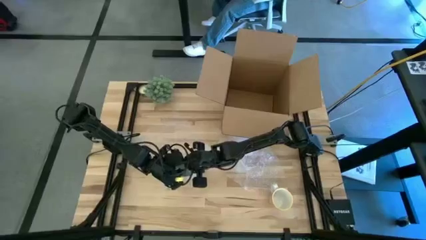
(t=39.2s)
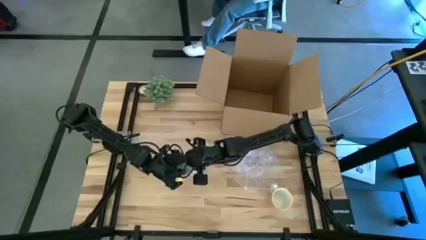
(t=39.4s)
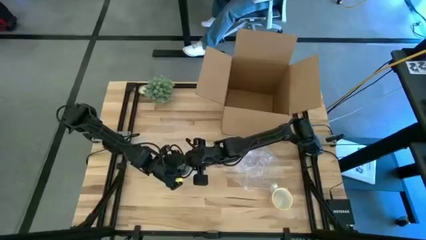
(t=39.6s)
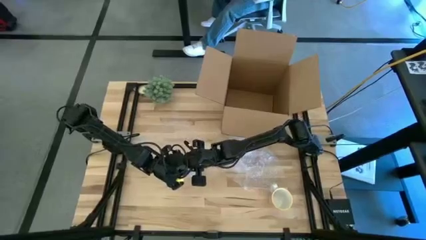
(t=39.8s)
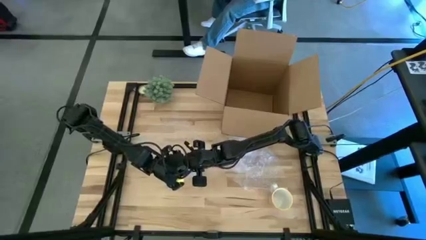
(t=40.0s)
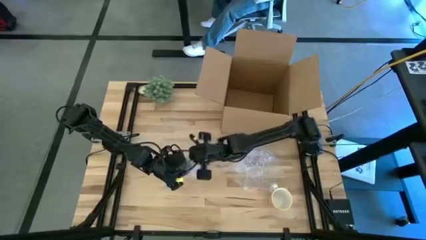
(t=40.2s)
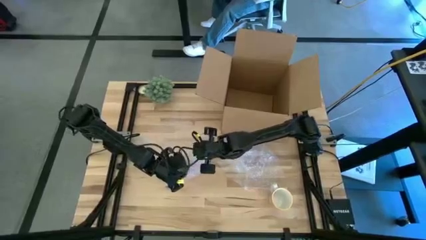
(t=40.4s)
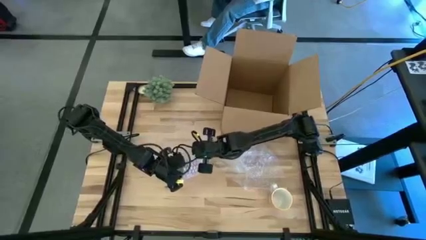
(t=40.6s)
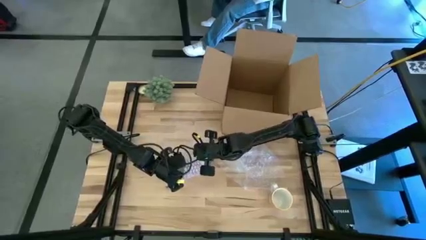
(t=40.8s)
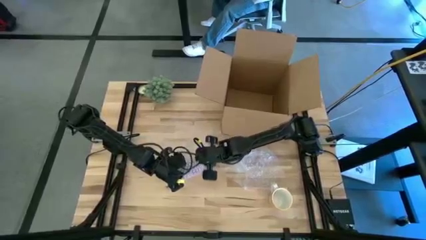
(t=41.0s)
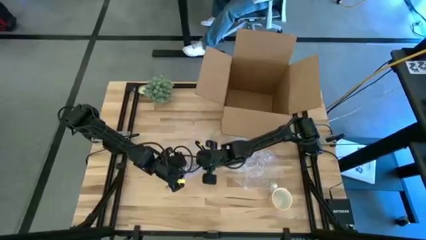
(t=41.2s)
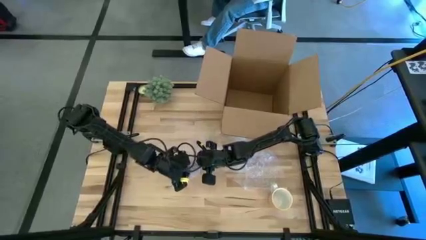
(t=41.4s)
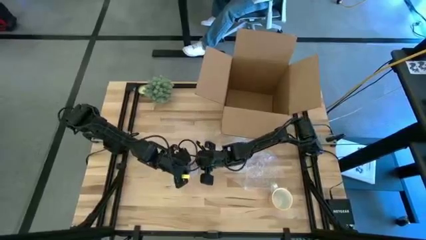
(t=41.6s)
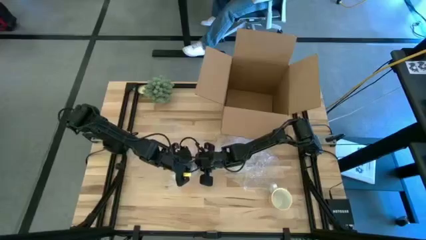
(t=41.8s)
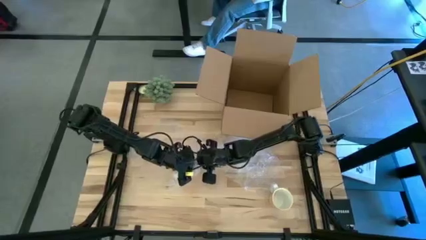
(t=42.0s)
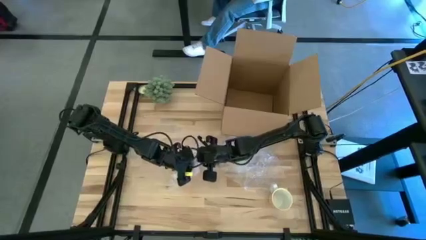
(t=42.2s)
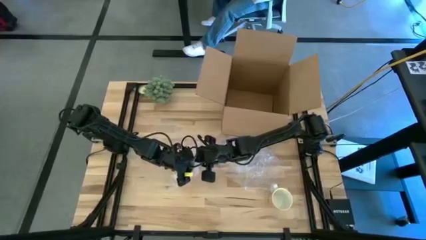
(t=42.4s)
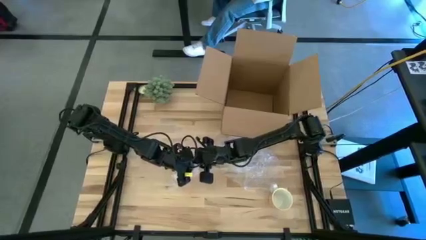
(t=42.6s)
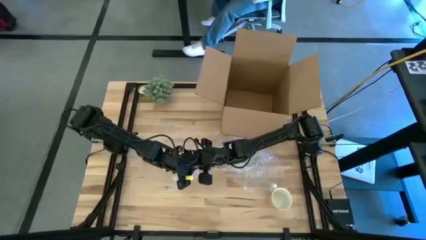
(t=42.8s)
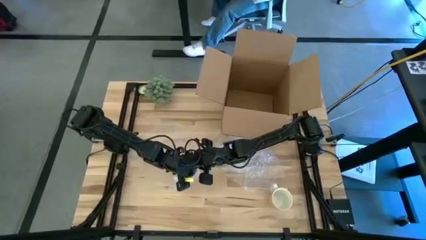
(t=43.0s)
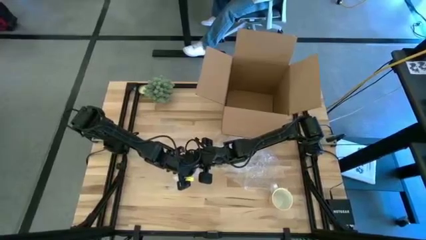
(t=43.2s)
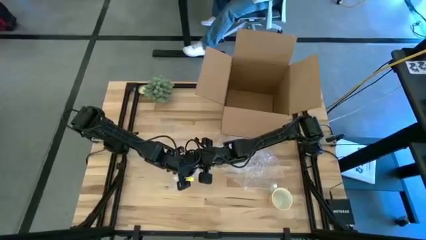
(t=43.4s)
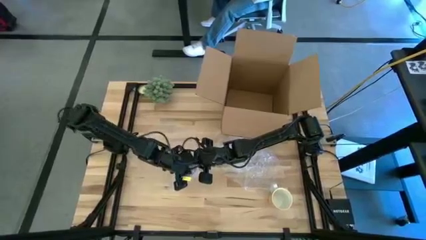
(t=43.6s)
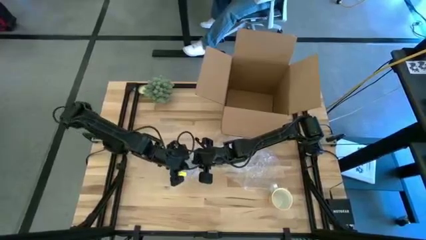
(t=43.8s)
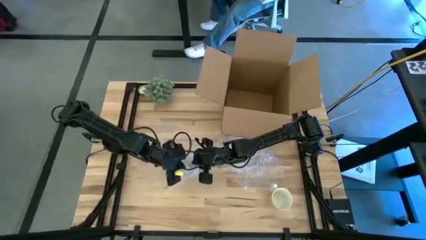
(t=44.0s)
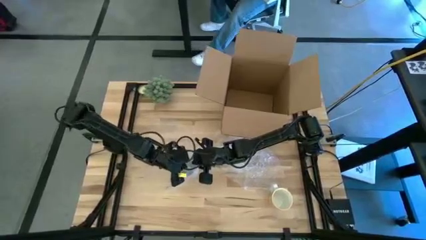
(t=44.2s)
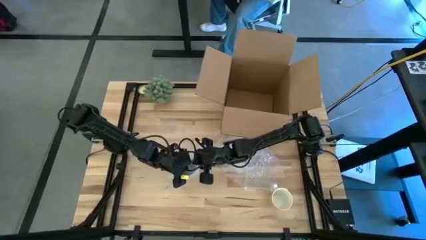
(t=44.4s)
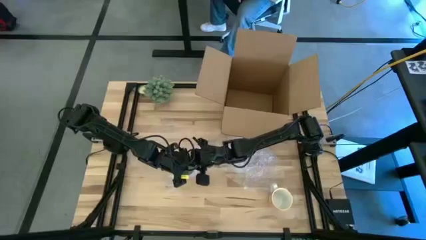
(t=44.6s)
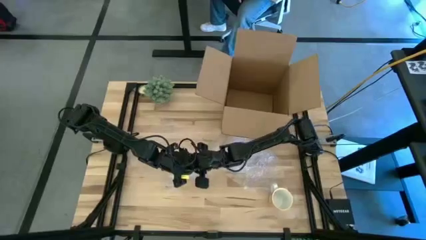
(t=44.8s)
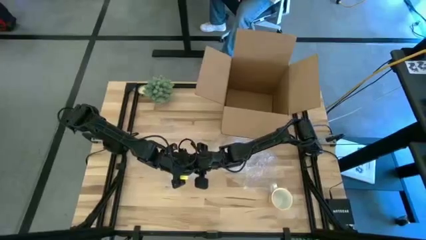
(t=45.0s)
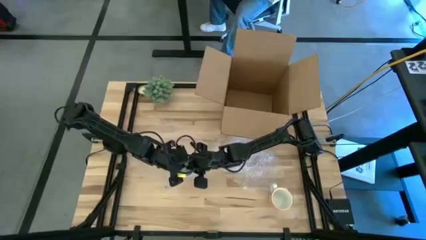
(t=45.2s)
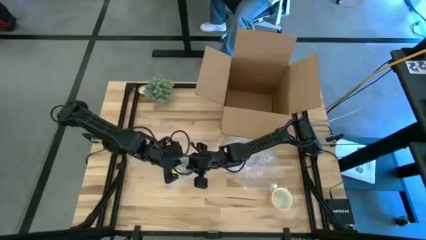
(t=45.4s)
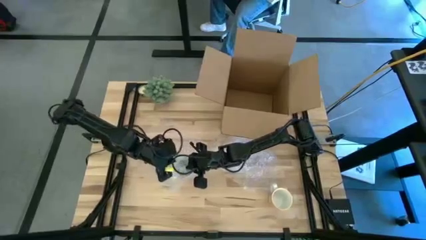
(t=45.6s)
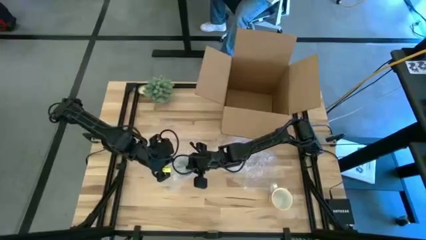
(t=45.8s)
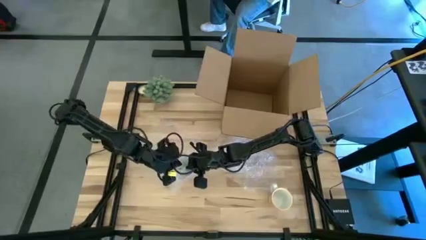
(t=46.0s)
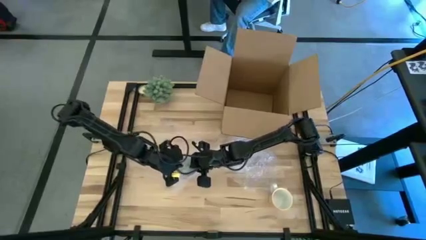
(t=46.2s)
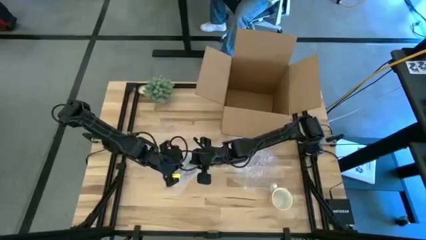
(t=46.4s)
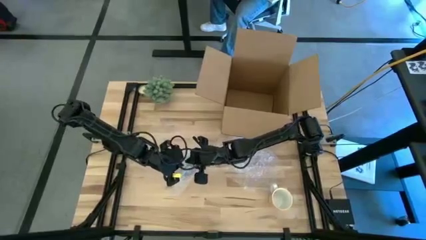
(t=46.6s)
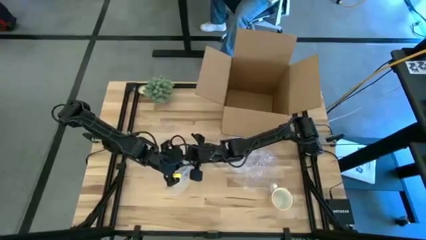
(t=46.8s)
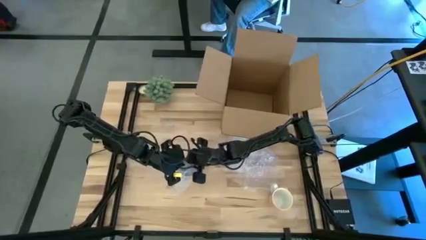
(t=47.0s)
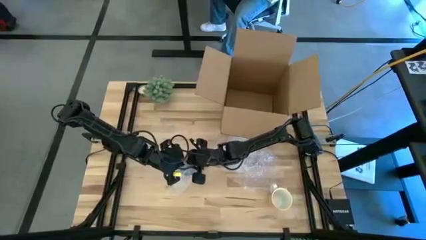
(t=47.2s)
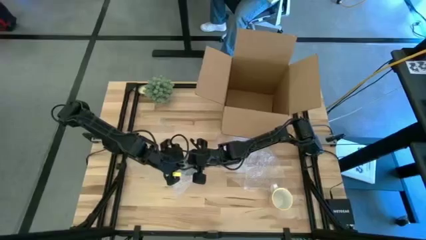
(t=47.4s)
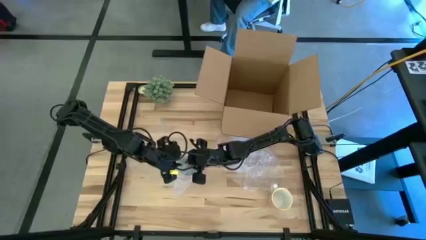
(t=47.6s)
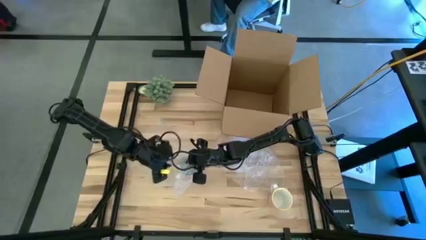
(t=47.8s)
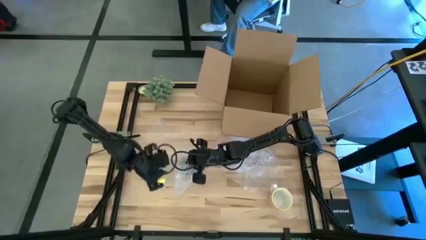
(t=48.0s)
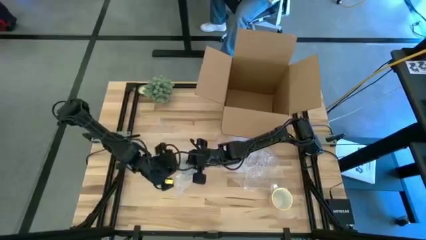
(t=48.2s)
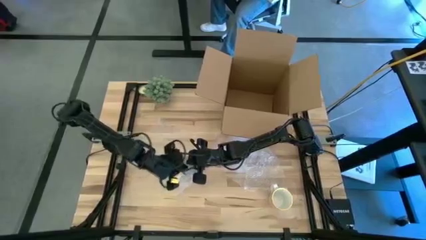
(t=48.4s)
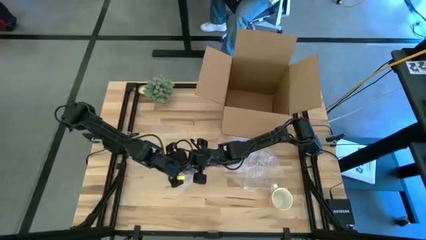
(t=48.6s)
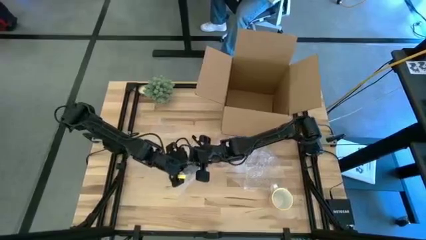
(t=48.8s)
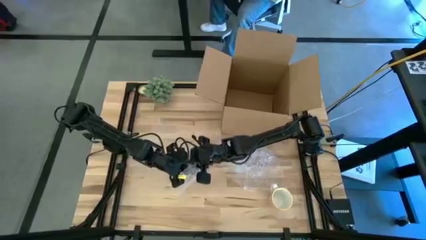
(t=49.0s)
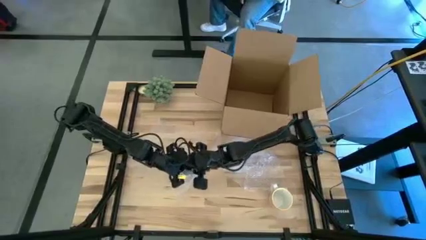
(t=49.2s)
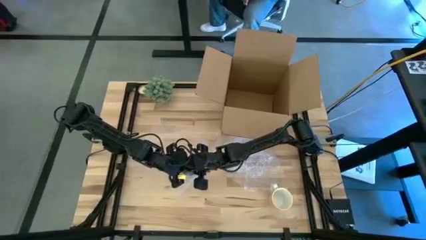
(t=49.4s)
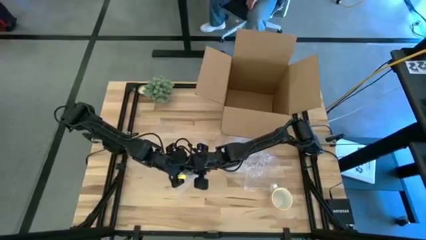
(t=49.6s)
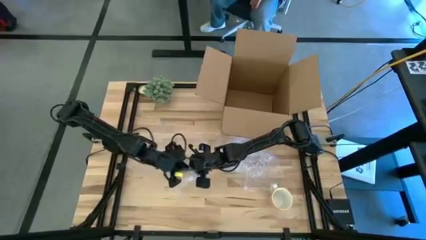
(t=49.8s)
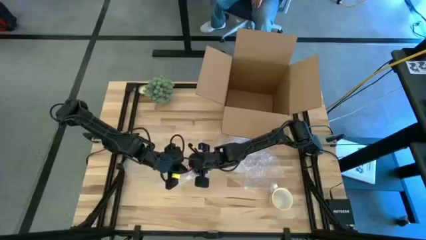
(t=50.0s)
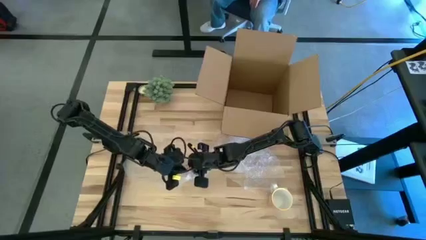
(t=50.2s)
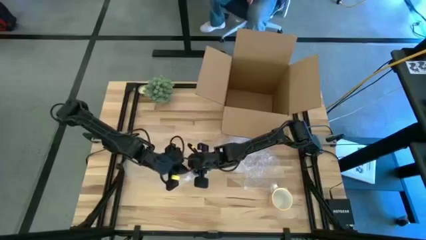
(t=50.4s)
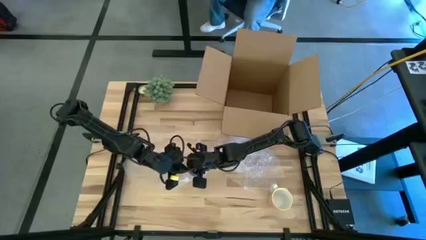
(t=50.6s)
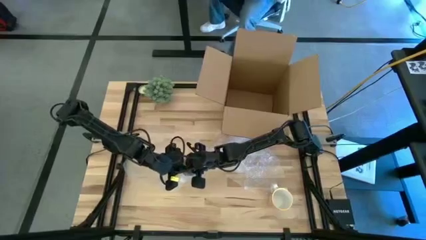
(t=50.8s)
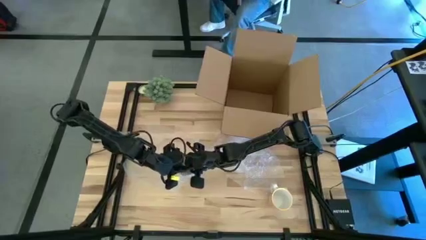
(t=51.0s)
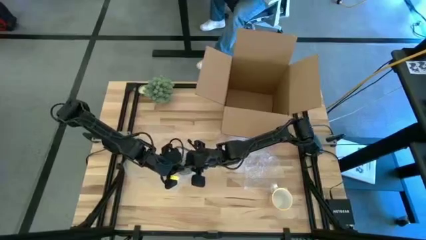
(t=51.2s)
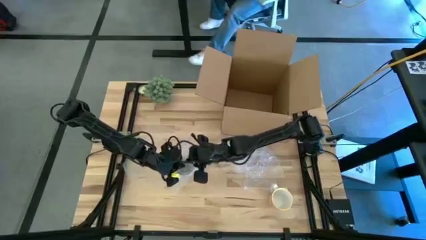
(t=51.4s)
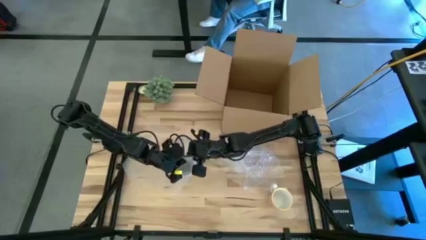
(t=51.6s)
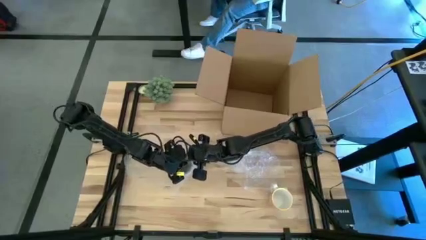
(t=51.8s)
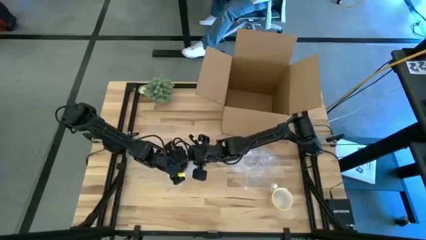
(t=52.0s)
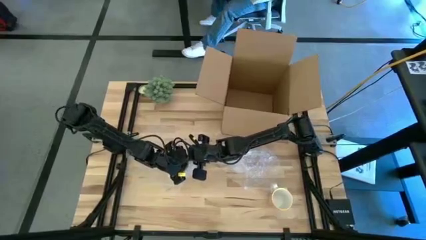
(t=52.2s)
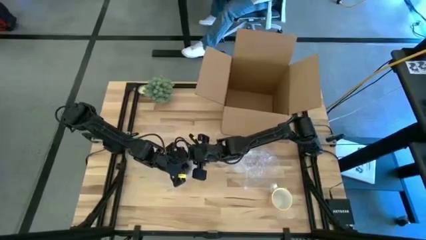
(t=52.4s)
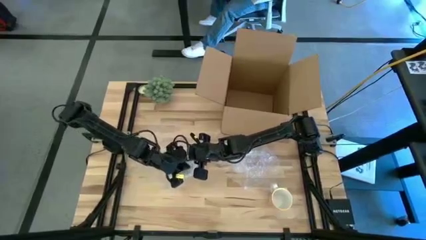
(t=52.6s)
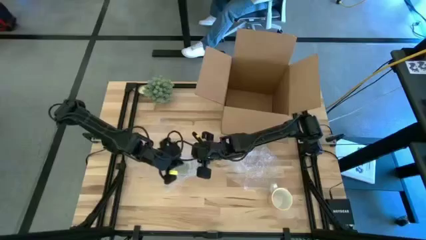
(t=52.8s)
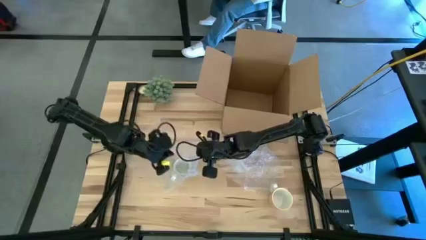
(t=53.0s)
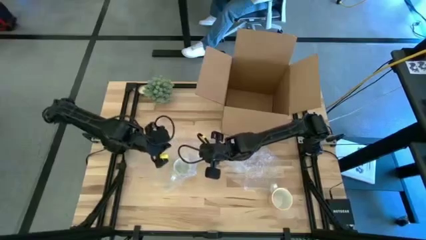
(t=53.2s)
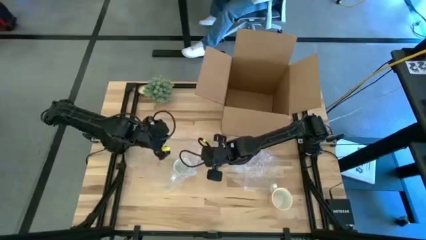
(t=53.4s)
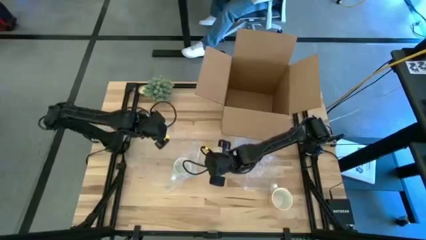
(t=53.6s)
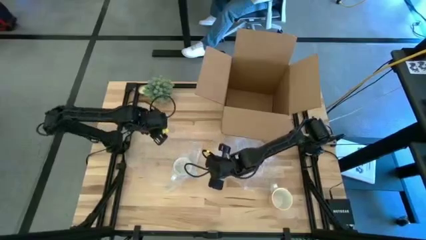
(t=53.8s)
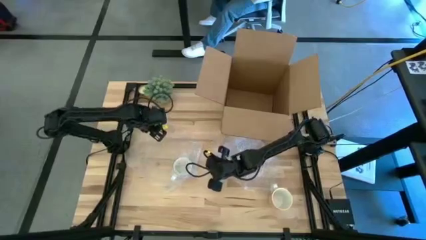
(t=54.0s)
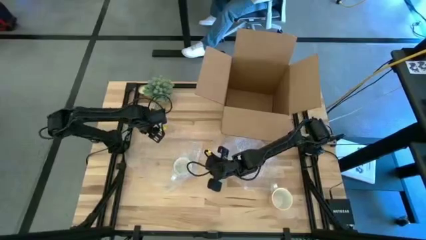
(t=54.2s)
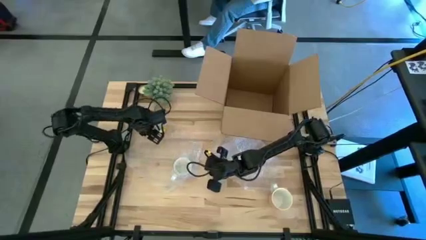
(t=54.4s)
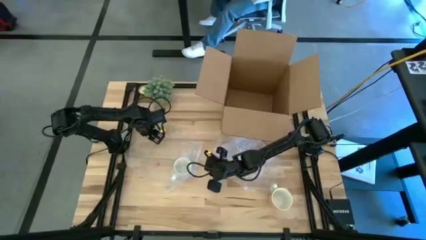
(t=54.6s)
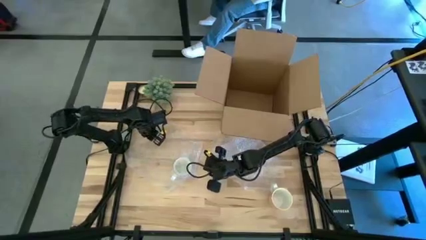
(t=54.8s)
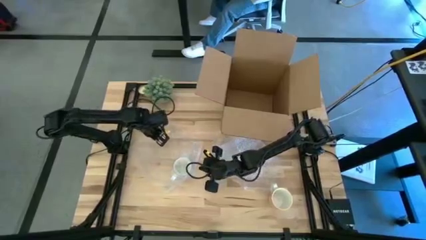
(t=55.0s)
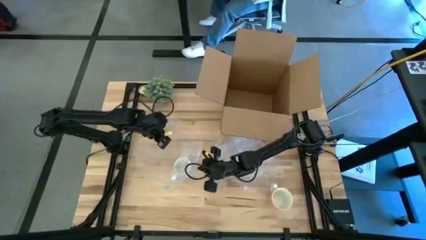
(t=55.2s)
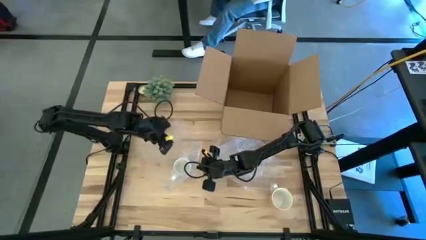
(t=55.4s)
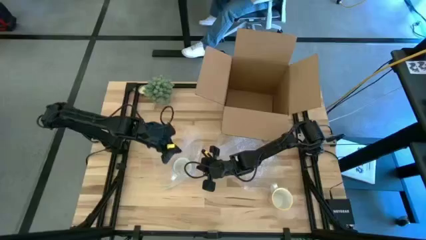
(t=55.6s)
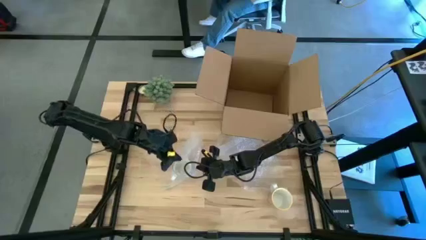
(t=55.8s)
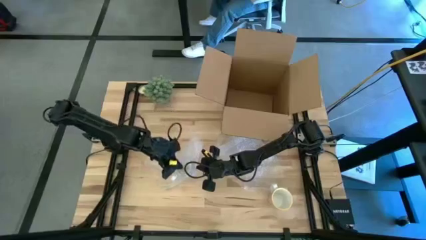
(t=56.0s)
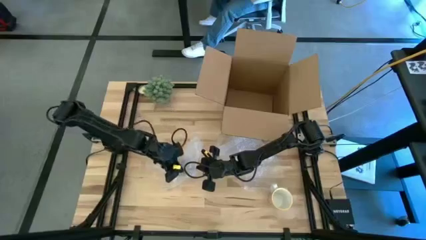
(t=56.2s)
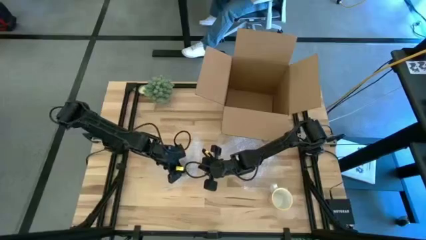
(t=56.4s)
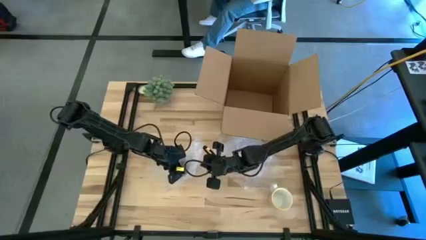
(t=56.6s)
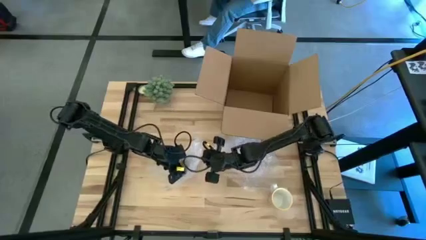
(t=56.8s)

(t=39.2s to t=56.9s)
Task: wrap mug
Wrap the red patterned mug with the bubble wrap
